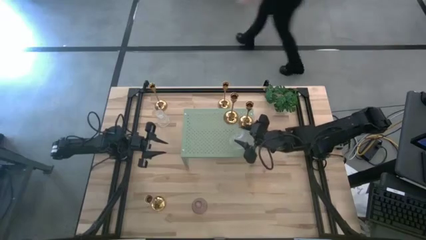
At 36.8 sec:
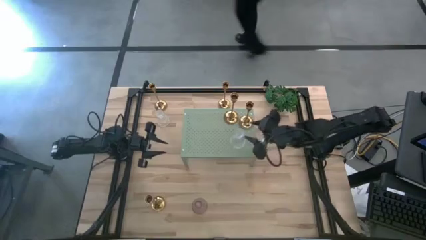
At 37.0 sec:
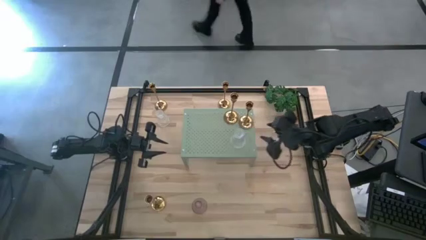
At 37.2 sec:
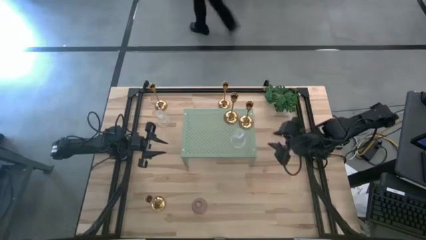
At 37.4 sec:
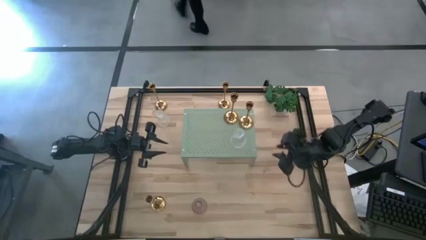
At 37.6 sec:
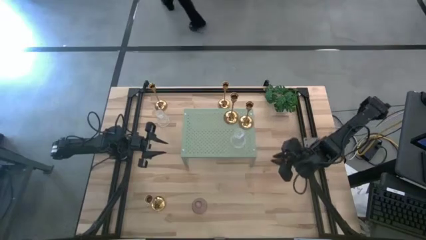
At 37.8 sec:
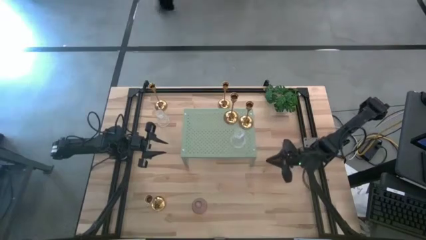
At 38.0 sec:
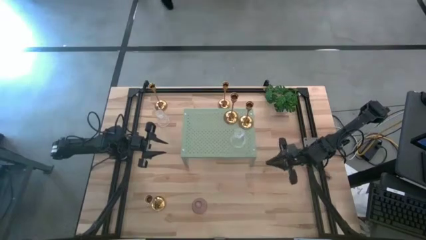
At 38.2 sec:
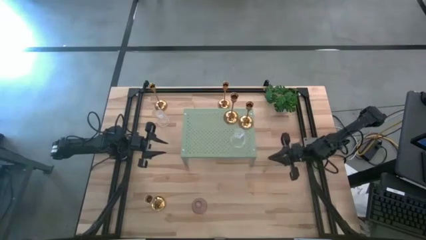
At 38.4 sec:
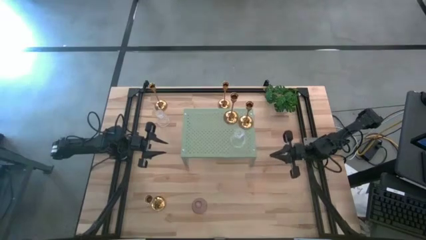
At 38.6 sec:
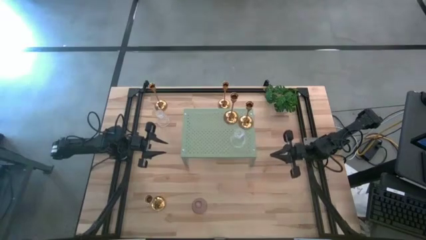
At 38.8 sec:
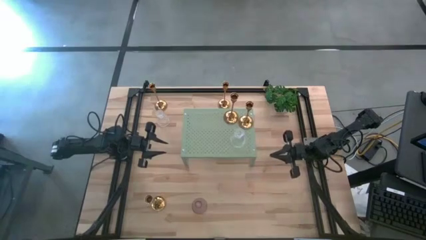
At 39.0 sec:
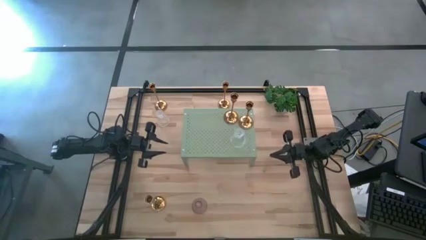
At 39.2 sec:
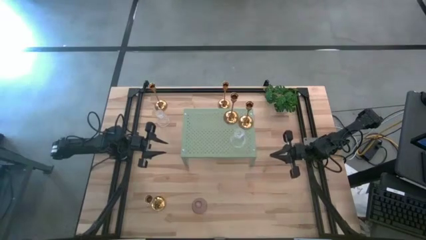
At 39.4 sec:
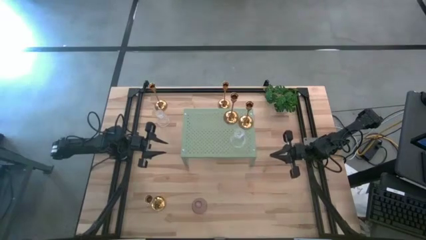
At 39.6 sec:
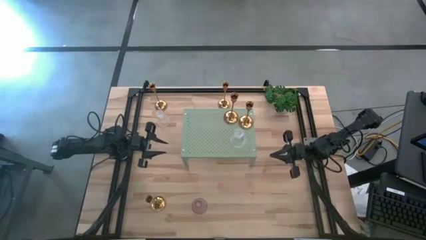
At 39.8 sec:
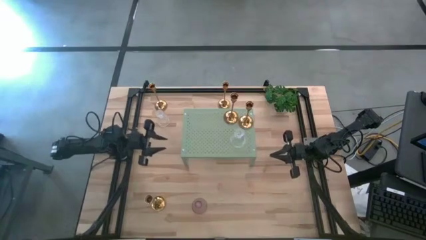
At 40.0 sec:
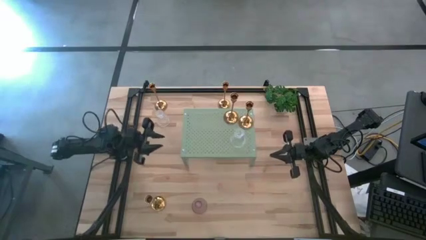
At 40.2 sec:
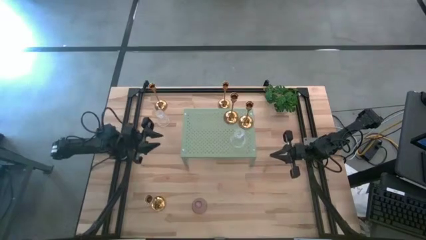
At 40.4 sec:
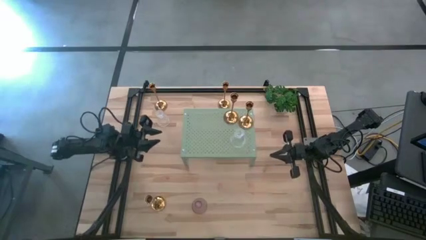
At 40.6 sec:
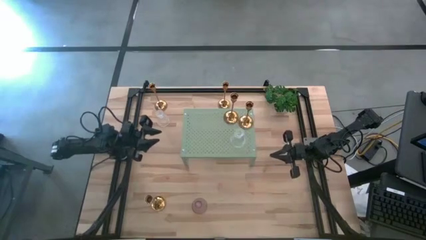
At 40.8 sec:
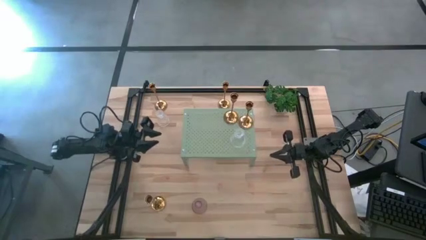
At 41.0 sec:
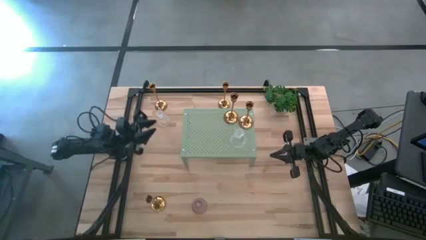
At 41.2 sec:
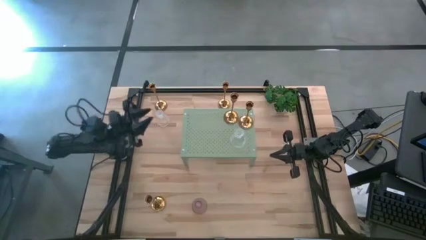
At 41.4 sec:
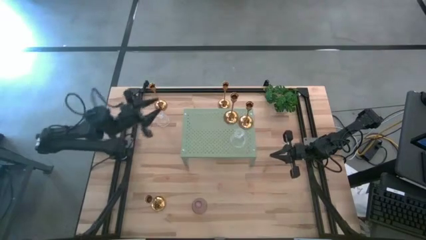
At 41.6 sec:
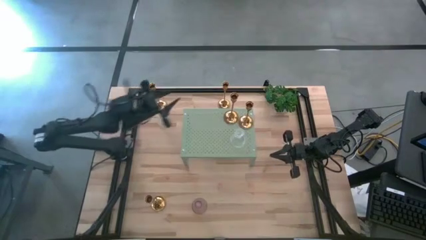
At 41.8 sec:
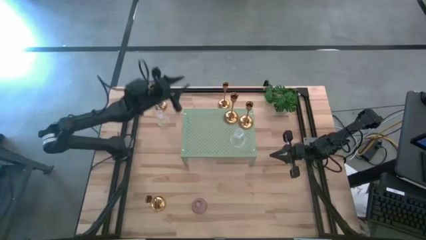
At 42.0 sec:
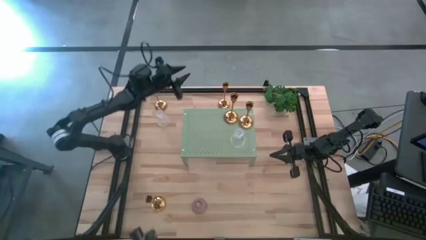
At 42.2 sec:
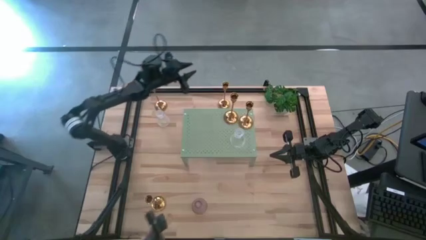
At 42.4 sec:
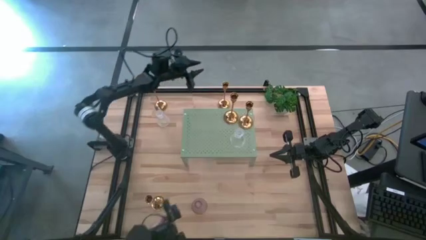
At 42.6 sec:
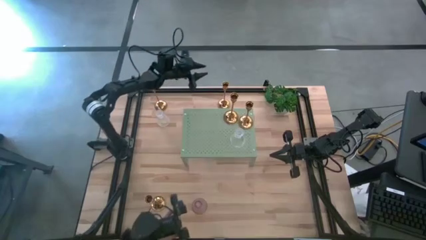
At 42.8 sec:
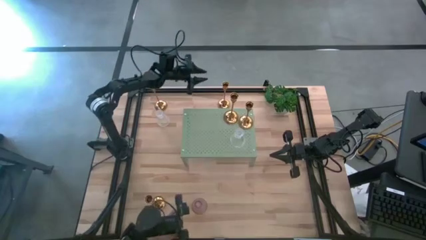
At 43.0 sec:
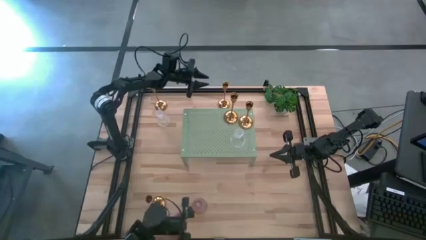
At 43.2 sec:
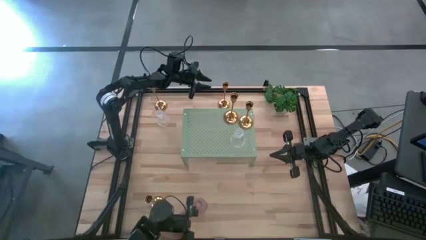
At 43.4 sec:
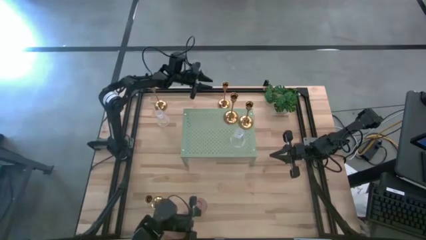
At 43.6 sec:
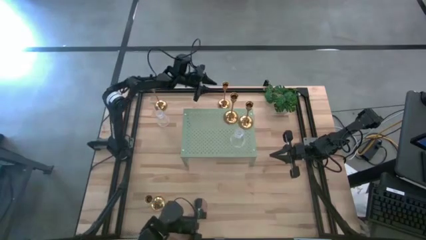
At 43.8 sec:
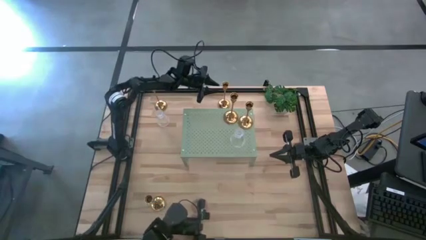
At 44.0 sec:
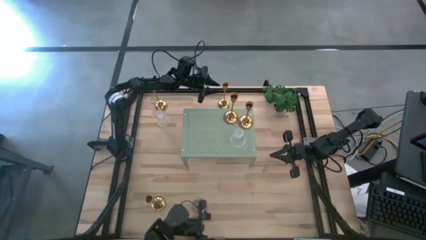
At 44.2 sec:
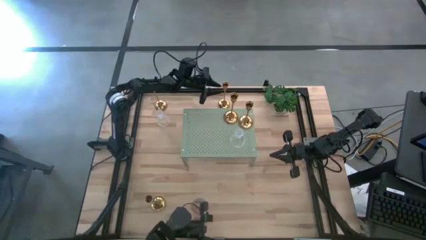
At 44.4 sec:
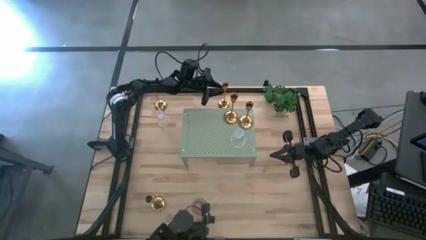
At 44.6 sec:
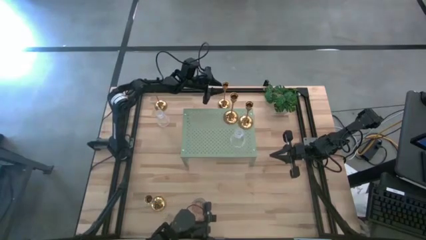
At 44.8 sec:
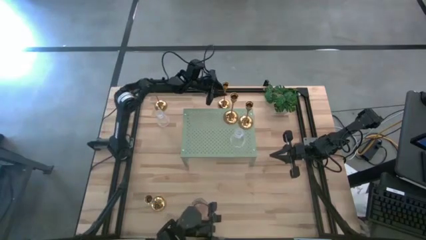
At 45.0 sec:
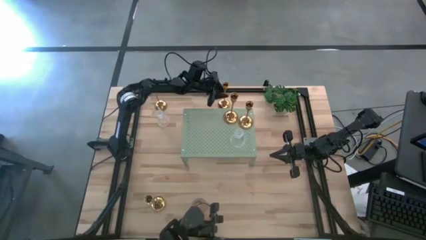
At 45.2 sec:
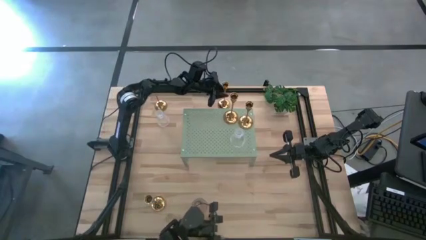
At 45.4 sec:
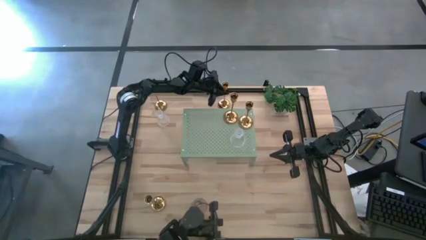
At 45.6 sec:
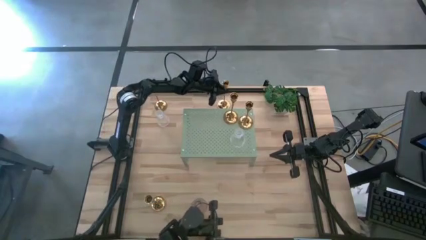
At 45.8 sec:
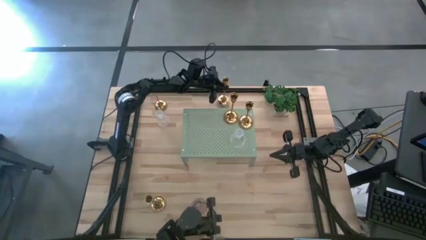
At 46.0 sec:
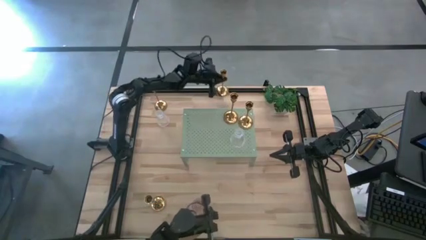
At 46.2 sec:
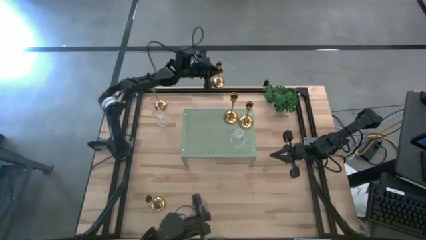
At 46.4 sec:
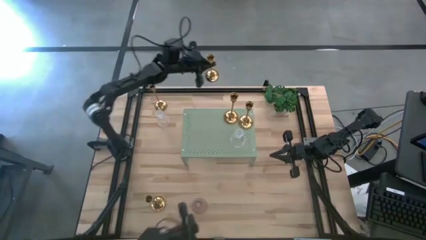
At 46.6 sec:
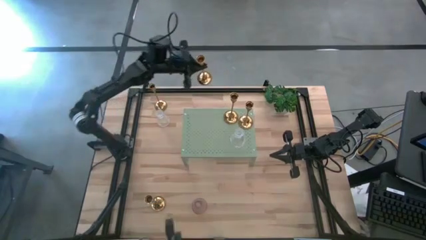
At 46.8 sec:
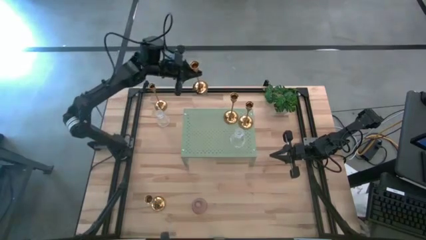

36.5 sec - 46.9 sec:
Task: Pick & Place candle stick holders
Put the gold candle stand on the shelf
